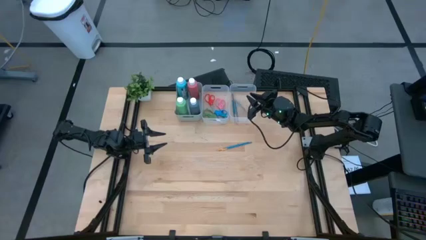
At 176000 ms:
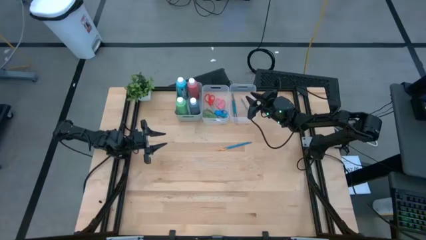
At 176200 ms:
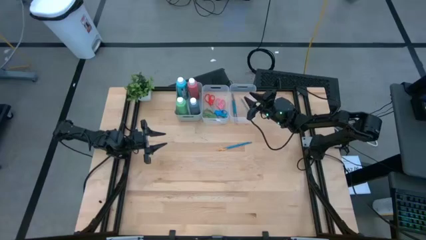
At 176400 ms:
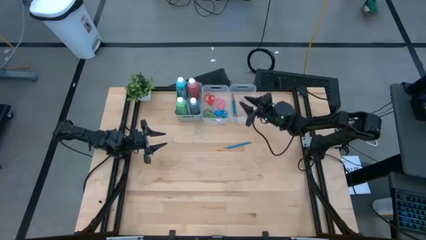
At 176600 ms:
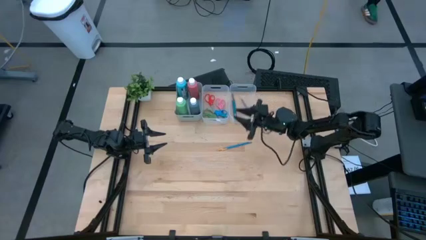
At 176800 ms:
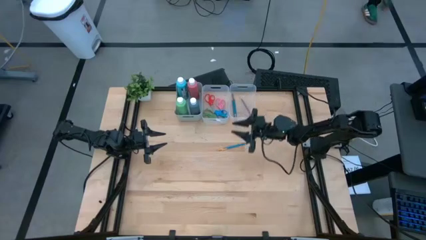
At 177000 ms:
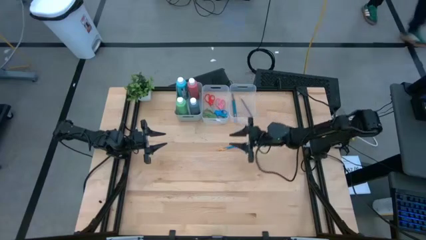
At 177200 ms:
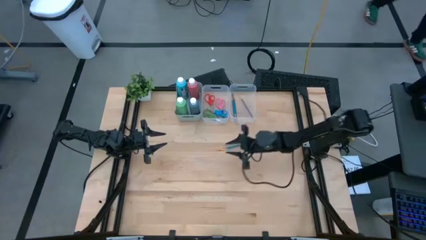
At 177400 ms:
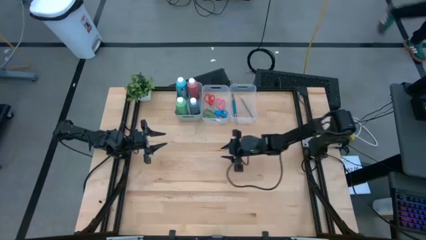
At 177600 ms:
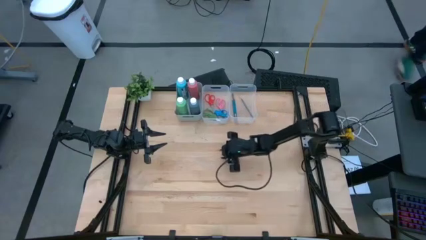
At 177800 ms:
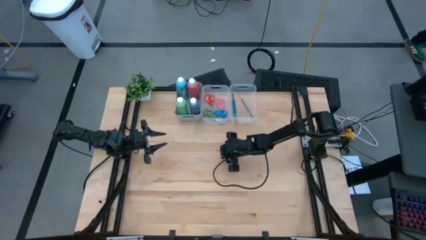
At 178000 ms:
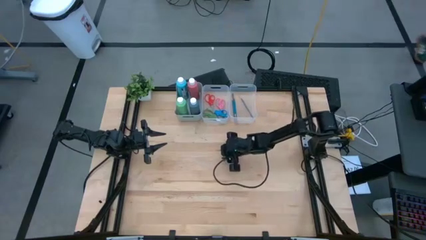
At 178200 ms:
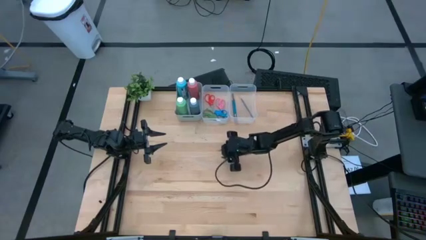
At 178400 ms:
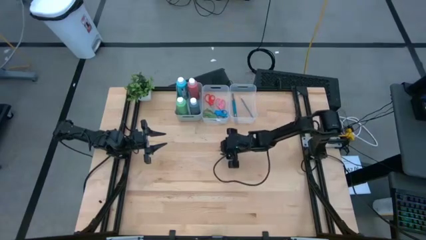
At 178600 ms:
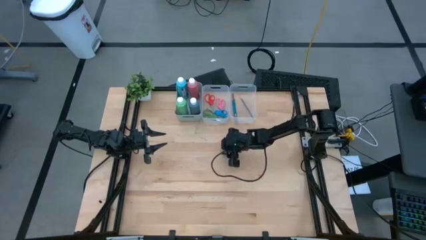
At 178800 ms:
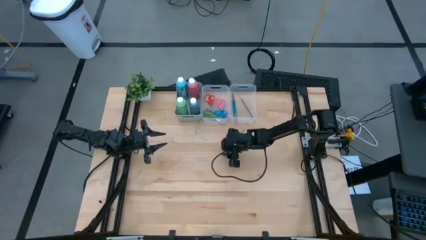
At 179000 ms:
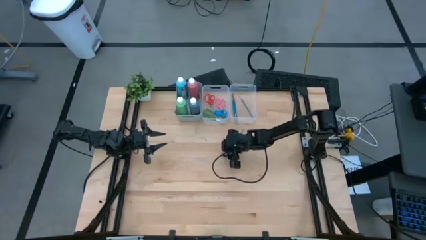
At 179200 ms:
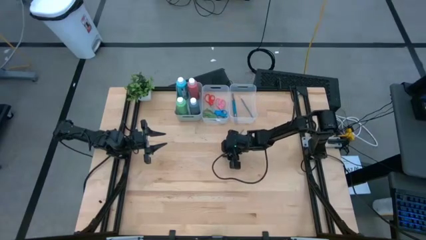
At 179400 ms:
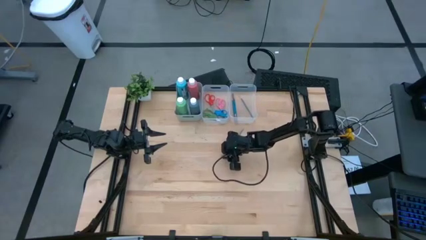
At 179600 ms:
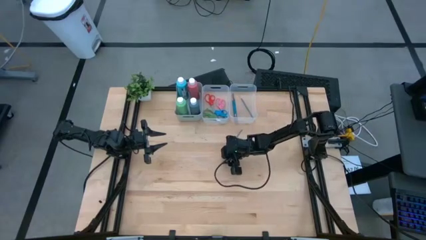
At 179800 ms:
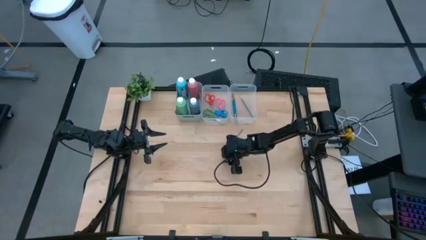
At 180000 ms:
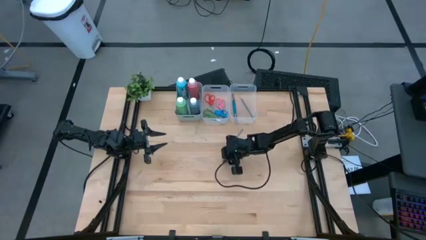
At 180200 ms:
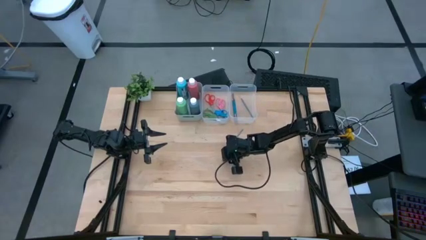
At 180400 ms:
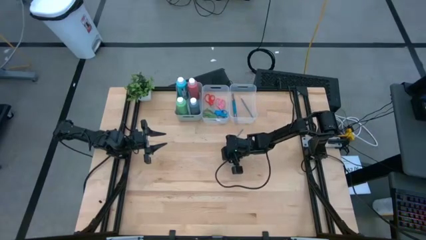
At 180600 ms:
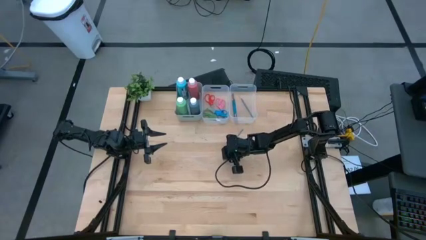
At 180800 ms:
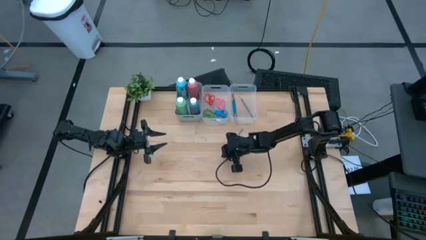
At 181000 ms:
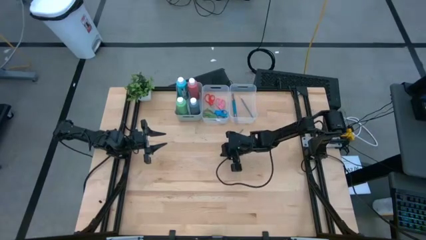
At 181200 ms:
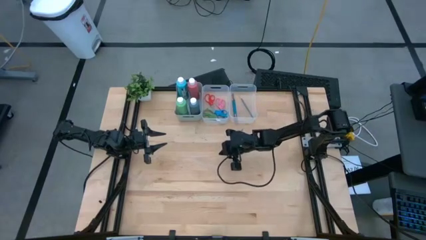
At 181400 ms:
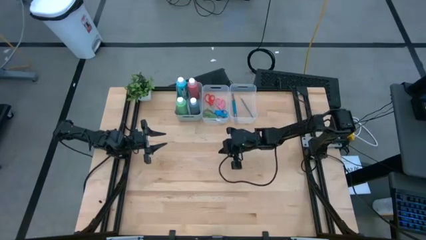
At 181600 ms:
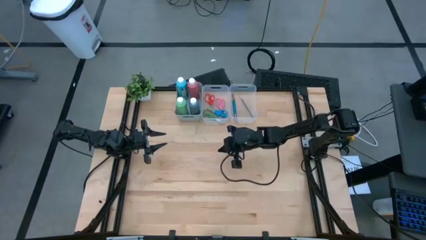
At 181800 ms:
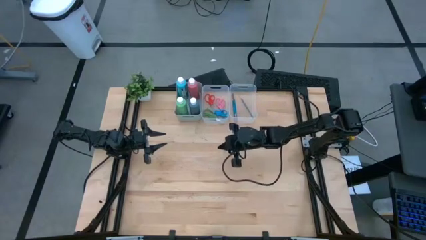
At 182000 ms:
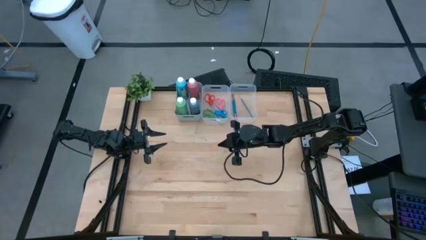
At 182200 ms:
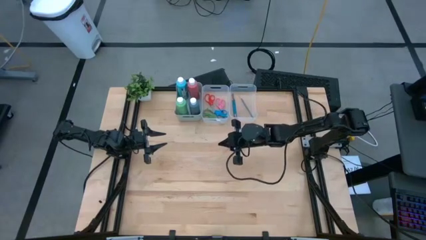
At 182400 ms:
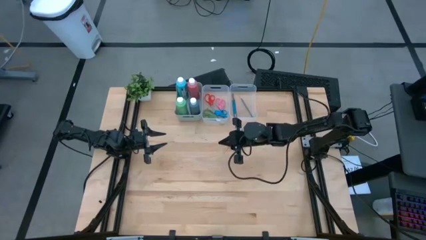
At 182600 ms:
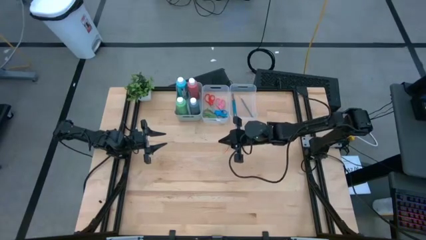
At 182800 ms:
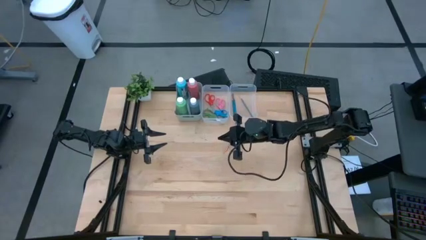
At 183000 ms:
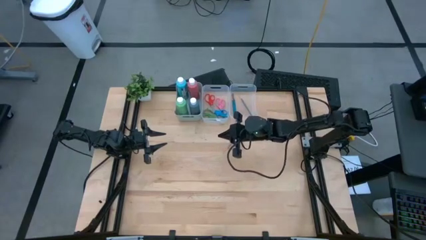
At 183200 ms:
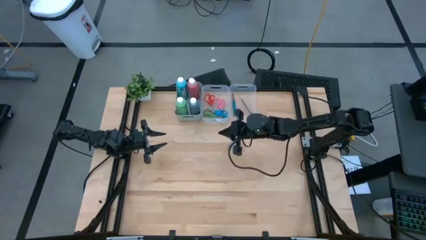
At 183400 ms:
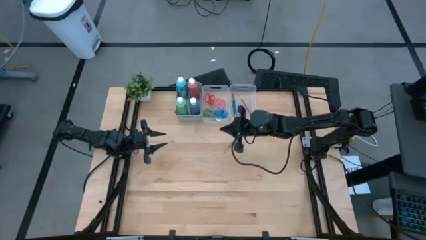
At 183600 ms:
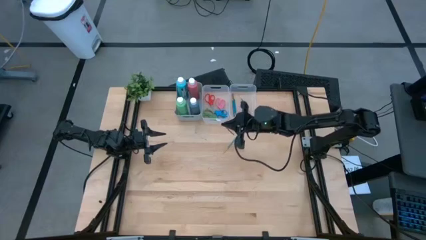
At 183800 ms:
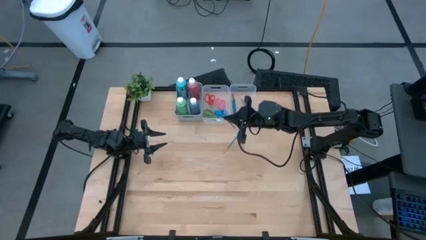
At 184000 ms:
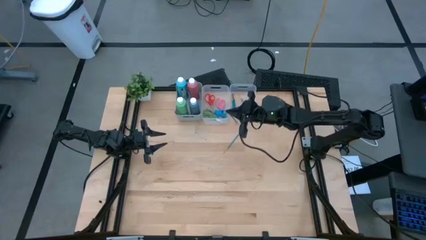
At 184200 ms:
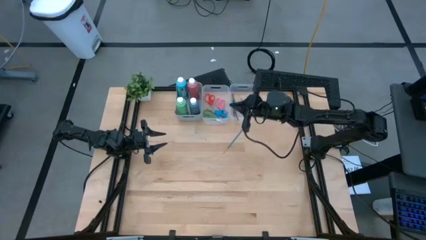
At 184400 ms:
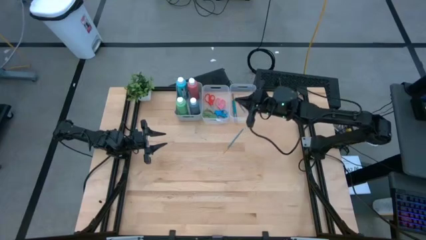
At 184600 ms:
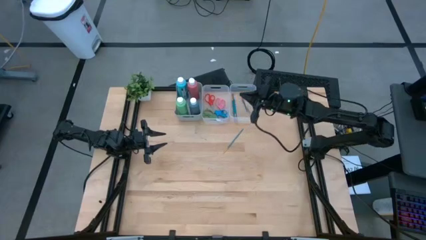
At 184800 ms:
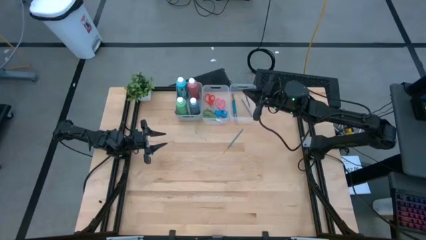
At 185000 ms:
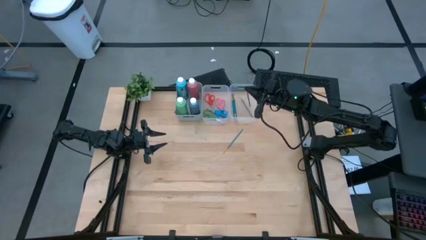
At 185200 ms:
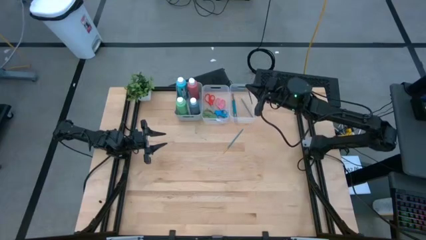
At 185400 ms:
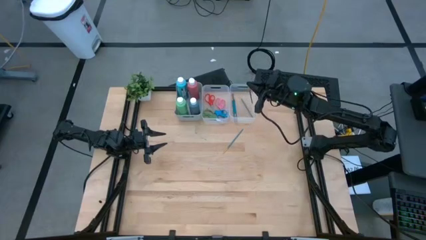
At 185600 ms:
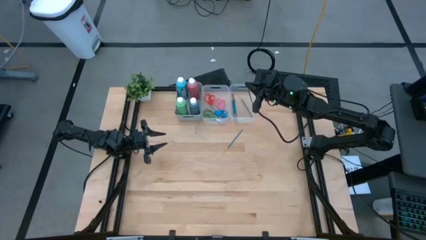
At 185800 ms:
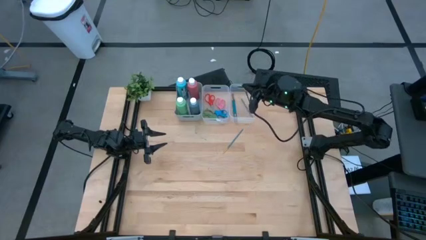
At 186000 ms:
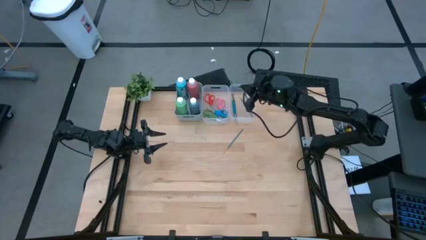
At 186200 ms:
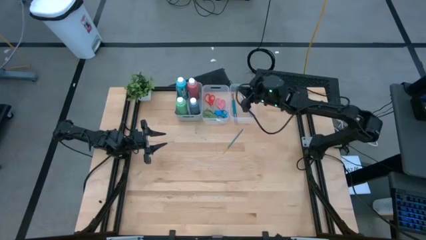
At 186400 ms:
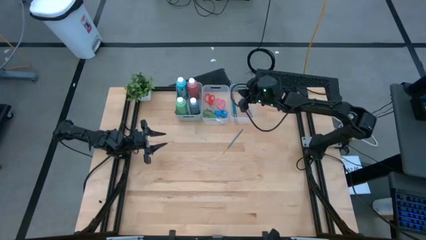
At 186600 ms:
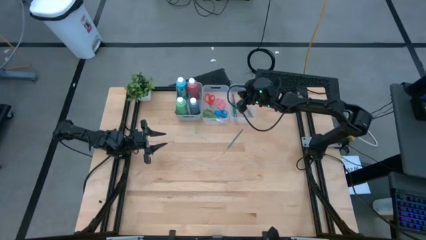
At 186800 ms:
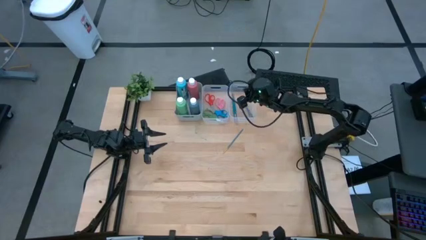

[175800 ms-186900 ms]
Task: Pick & Place Paint Supplies
Put the blue paint brush into the right transparent bin

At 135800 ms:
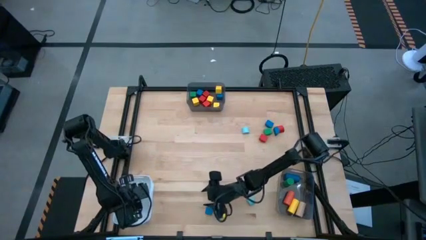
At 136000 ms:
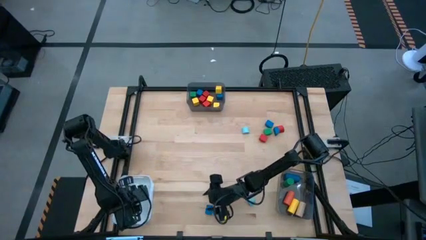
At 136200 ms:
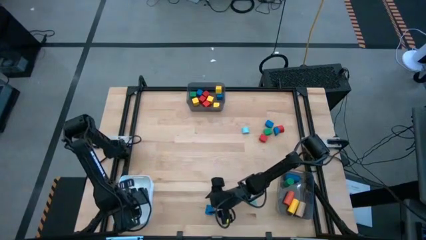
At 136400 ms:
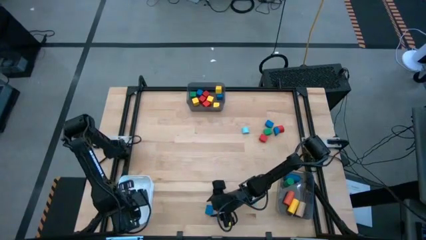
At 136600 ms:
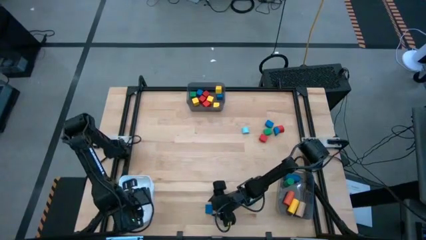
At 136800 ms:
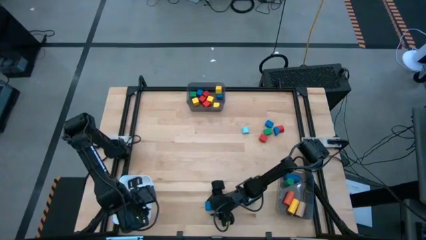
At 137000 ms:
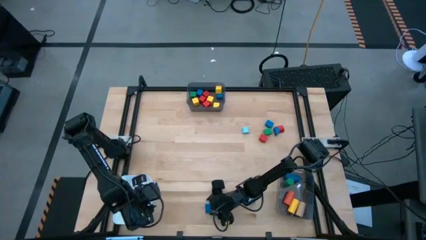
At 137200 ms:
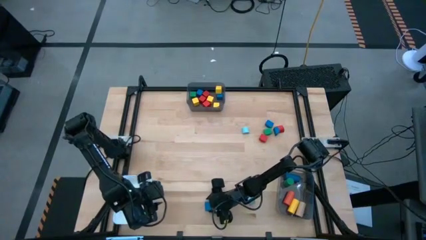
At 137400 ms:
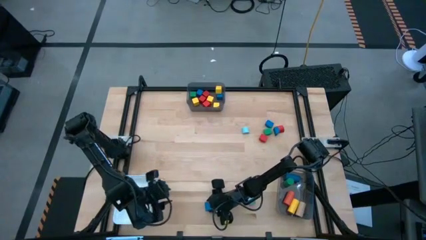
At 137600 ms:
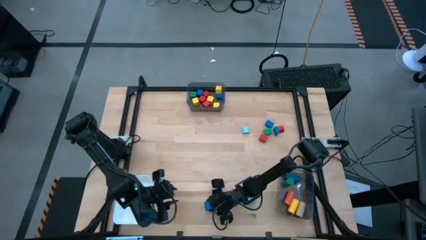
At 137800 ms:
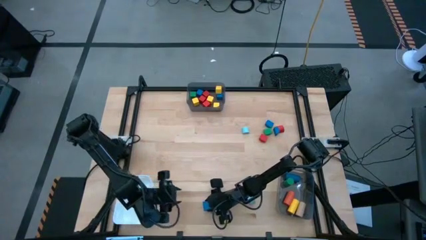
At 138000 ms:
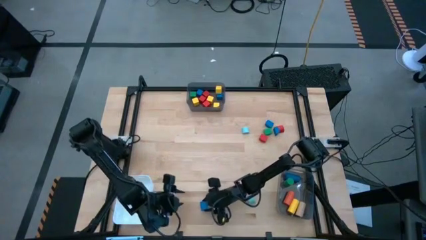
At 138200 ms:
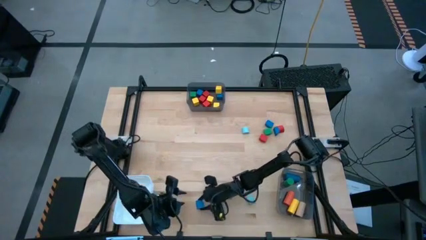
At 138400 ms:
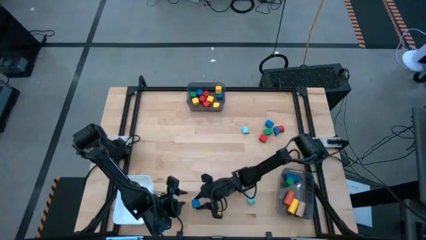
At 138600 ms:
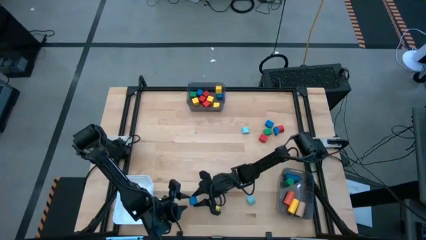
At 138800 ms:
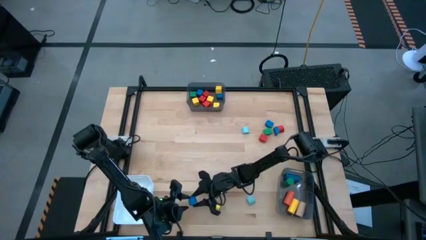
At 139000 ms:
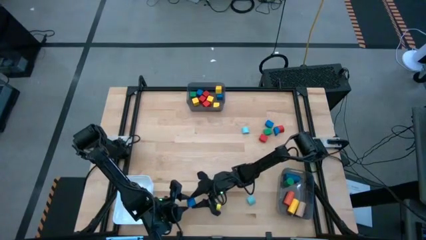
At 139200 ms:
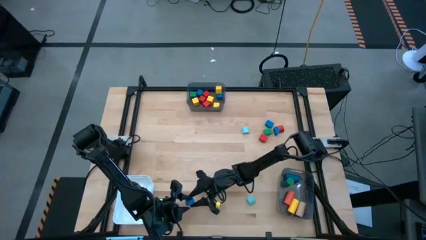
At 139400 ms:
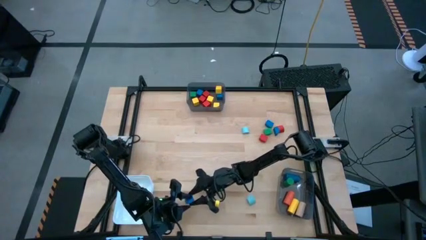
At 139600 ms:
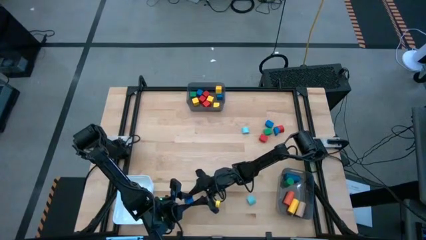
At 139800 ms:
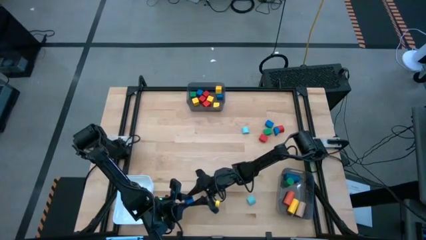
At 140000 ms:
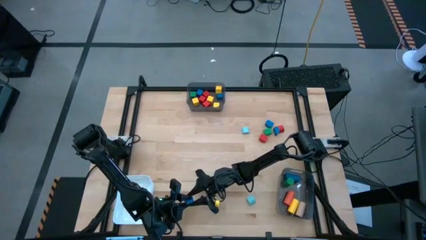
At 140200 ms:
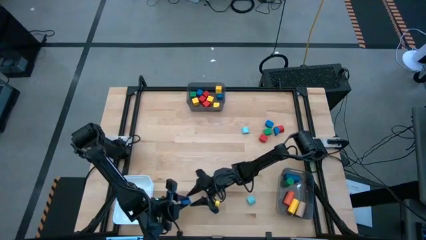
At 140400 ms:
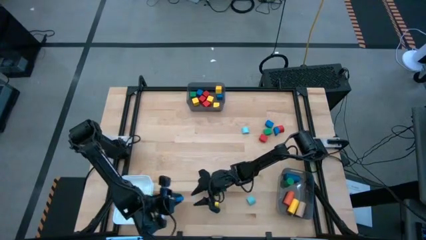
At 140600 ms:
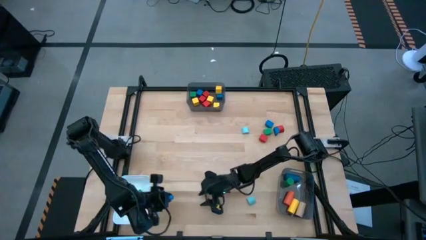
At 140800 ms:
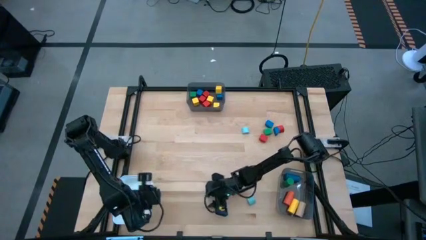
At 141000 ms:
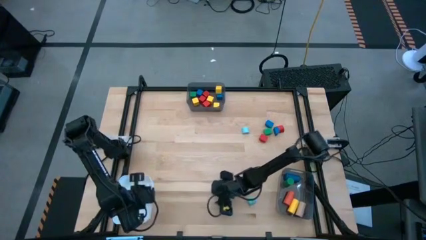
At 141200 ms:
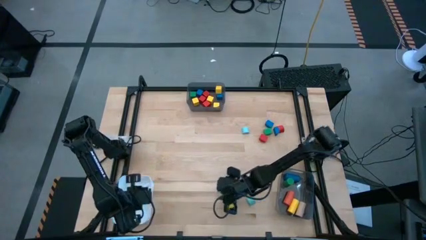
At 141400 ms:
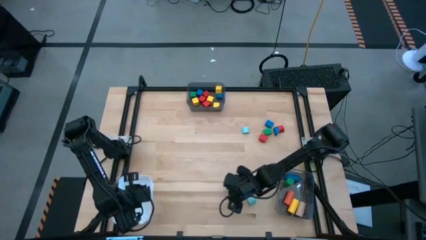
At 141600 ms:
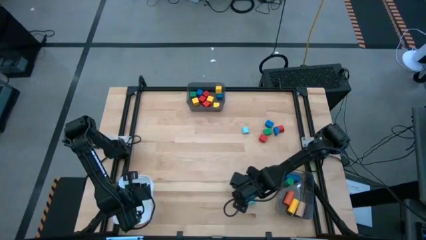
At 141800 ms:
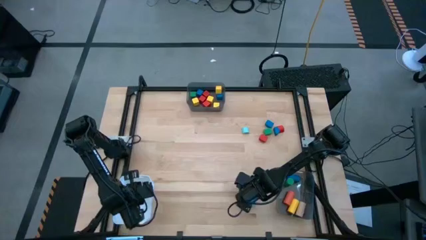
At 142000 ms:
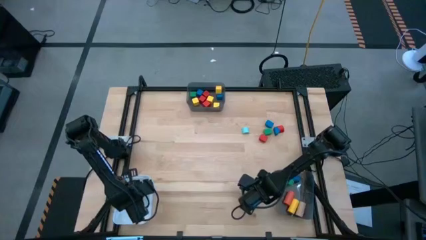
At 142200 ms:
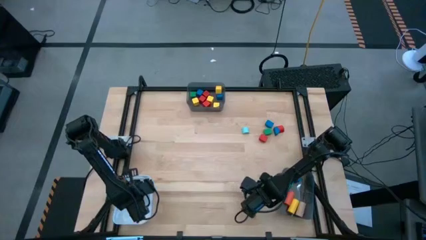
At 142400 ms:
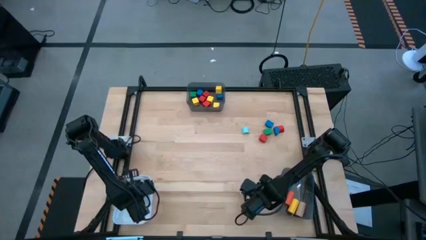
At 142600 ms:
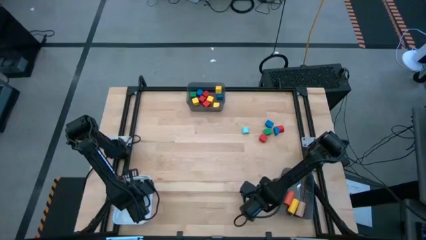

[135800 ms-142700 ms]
Task: Sort blocks by size
Put the blue half circle block into the white bin
